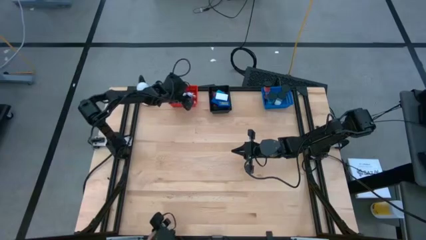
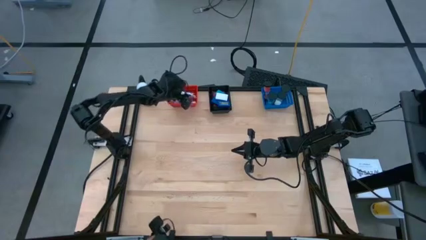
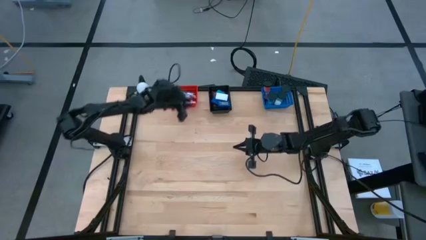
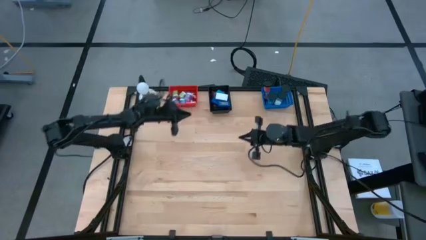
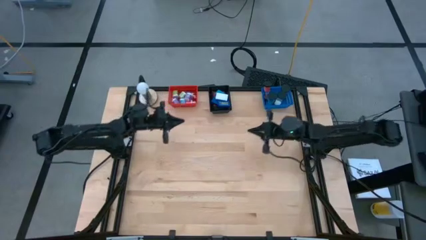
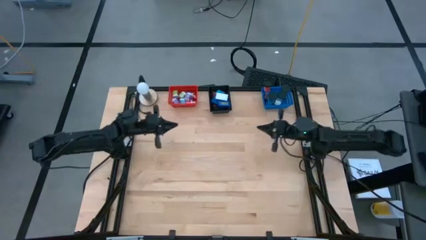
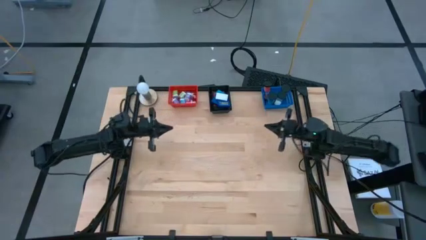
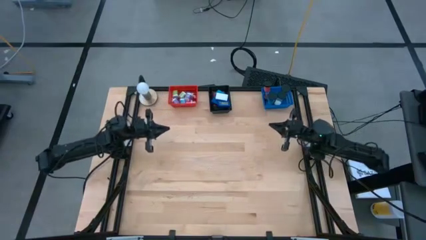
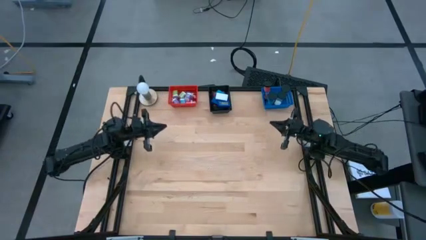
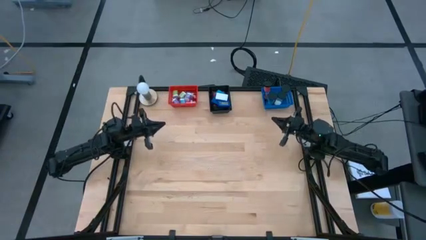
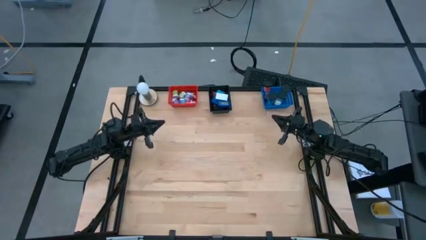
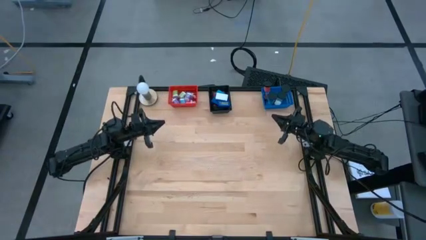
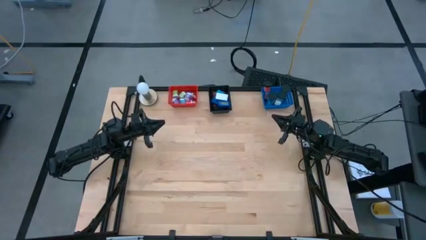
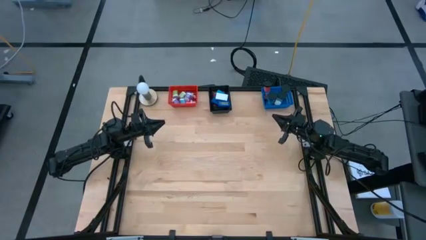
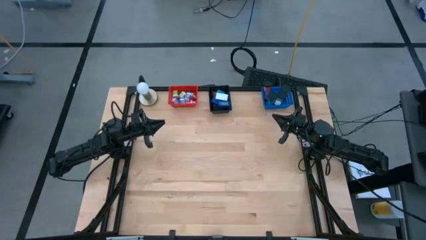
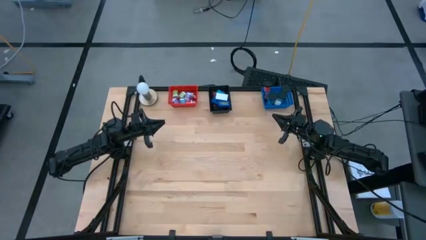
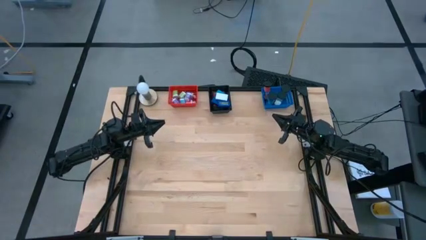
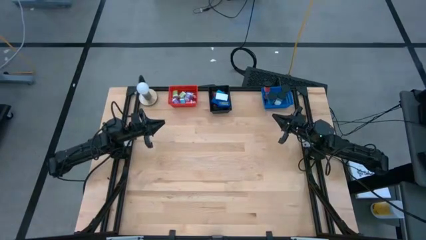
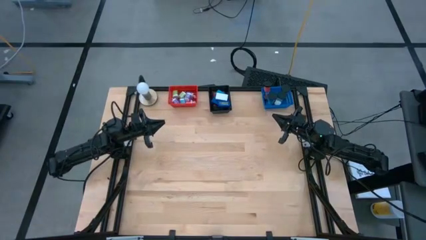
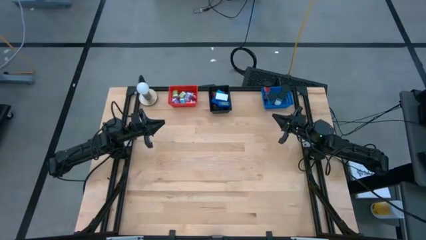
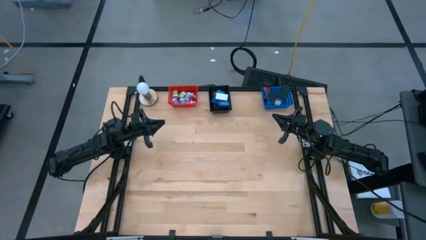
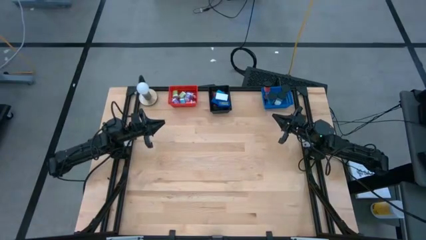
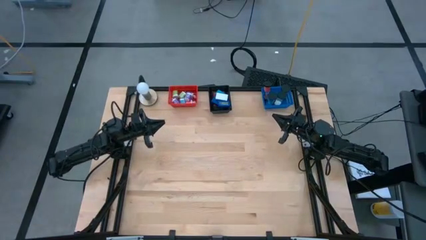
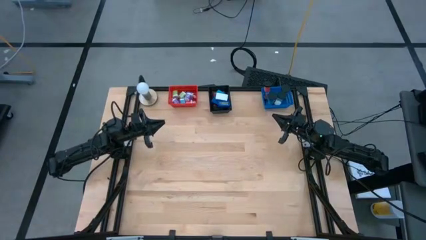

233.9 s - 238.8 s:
Task: Pick & Place Office items
Return to Home Position

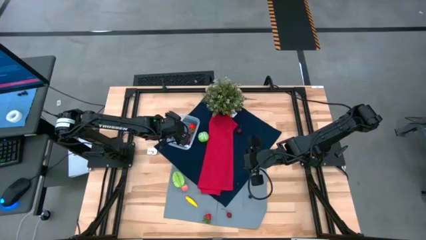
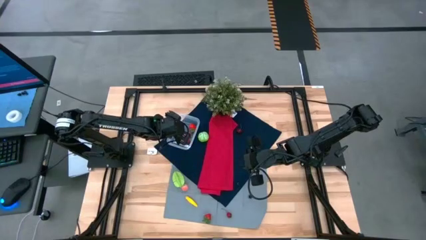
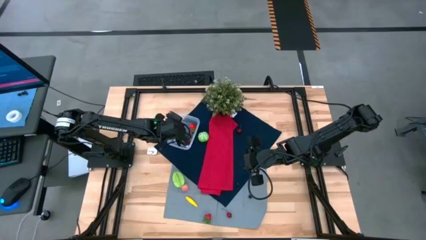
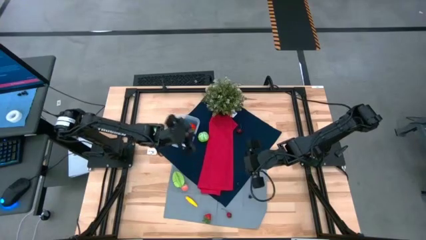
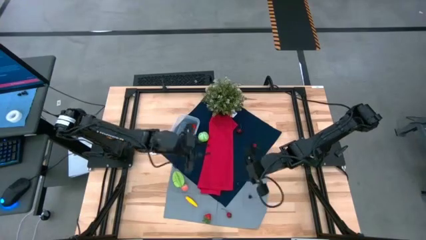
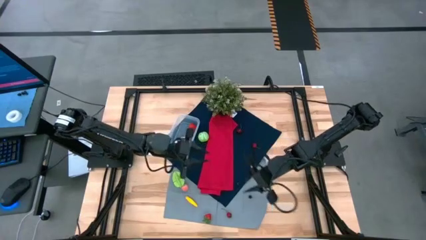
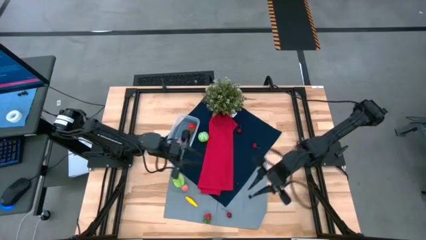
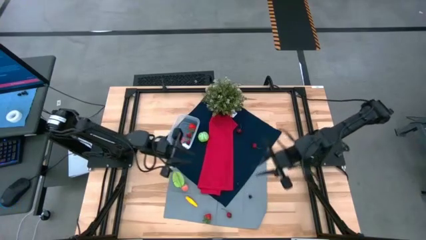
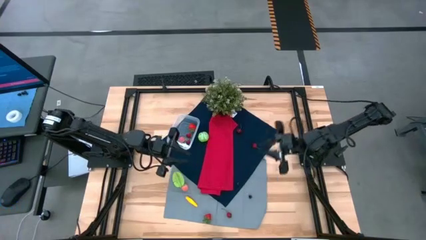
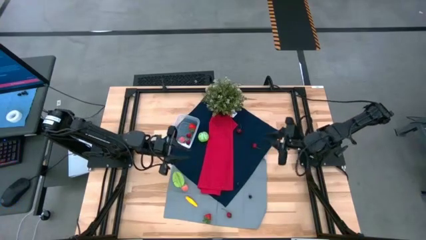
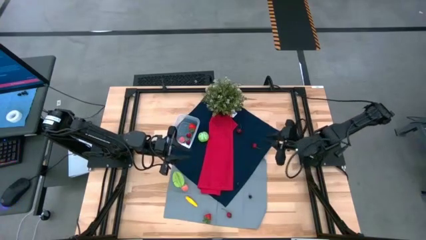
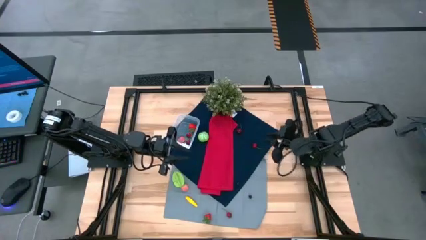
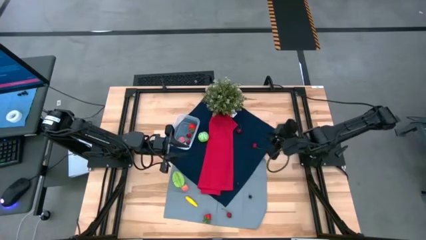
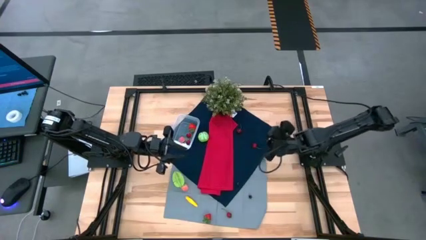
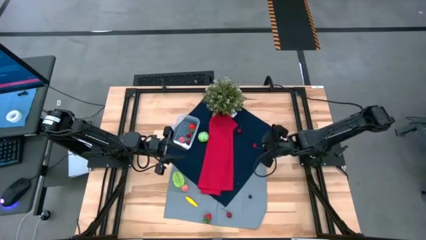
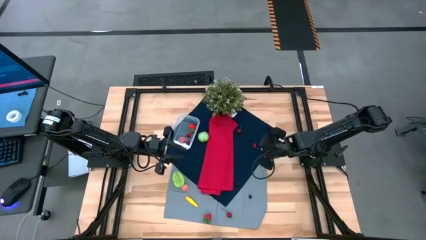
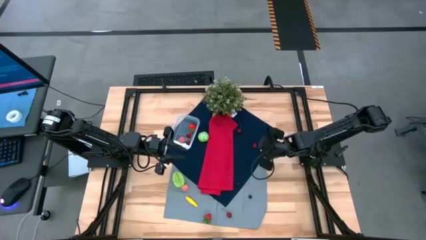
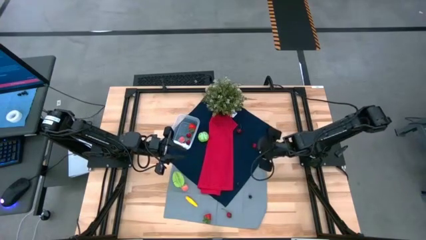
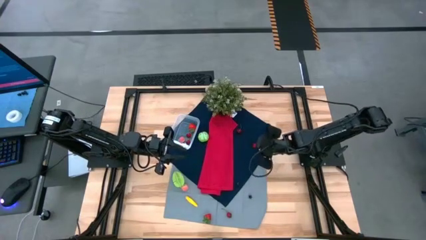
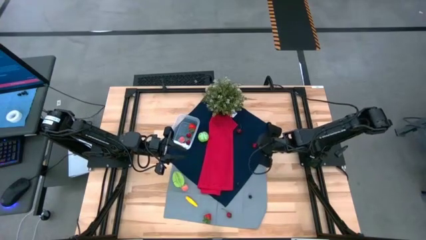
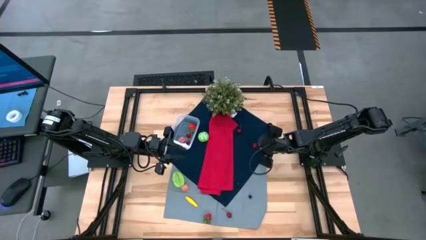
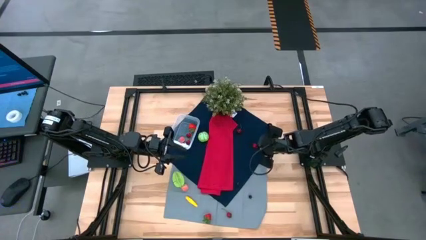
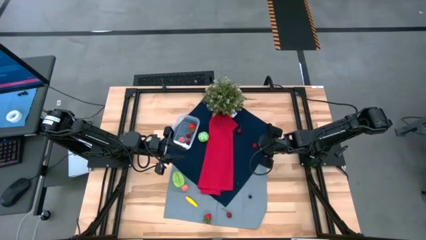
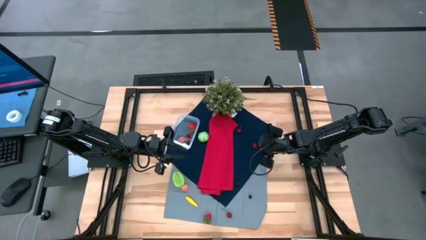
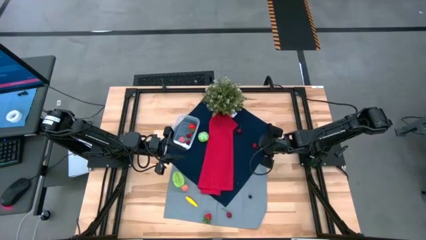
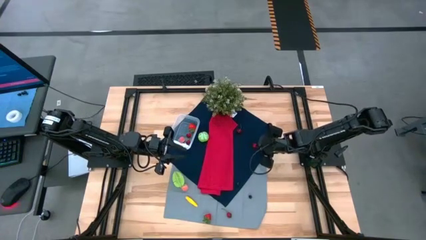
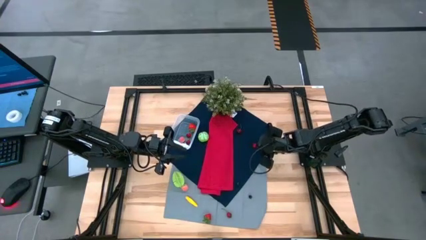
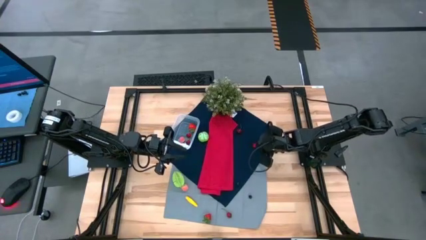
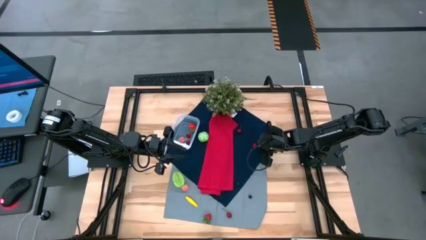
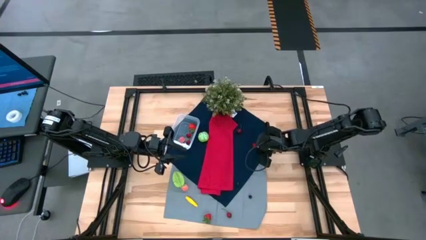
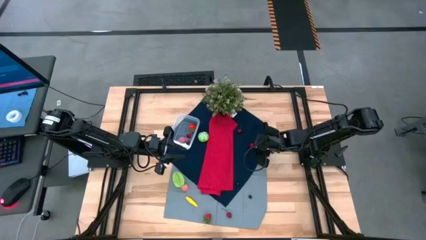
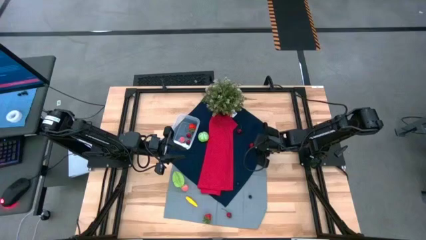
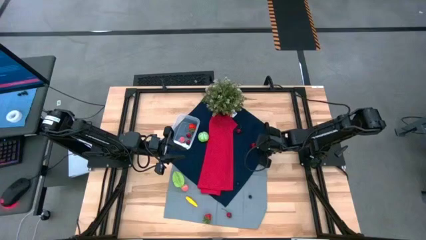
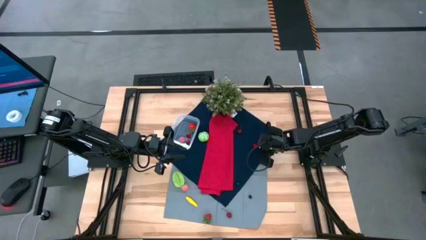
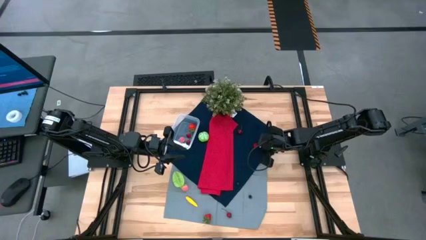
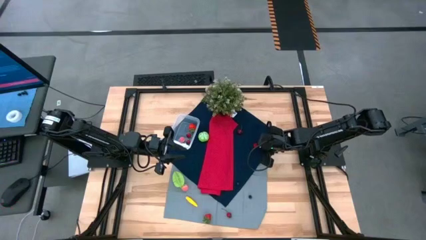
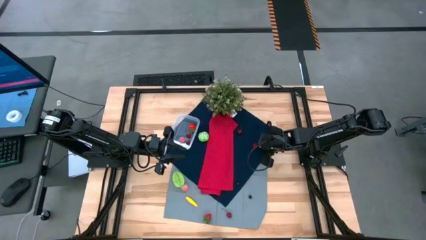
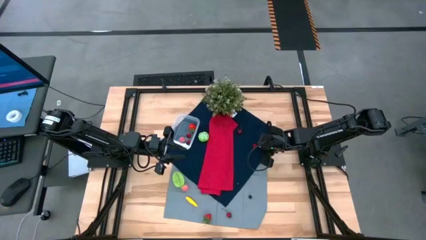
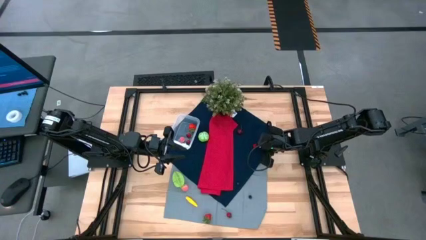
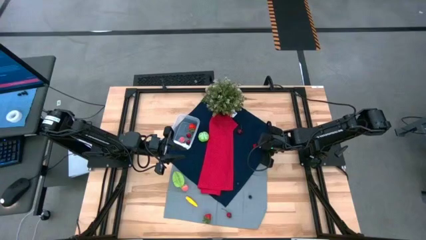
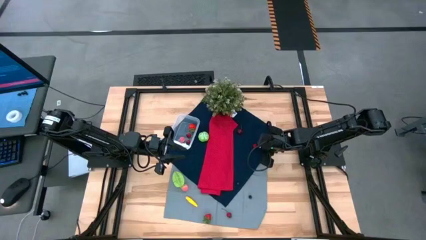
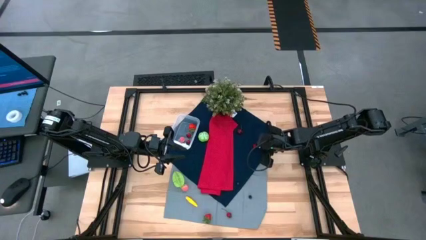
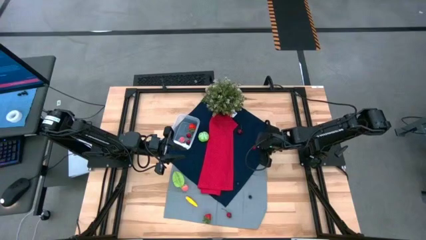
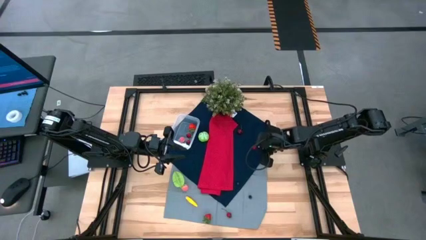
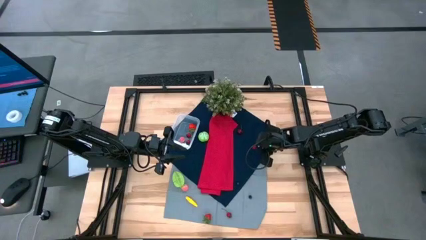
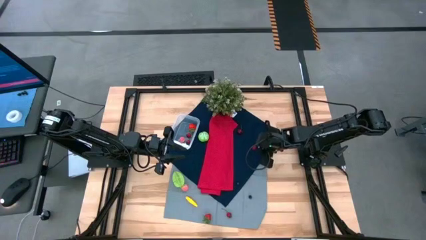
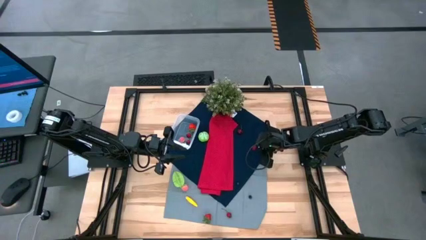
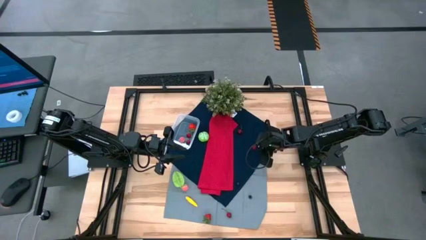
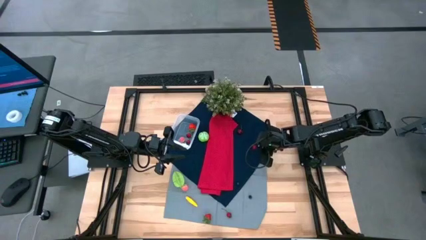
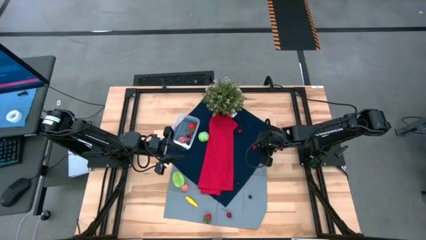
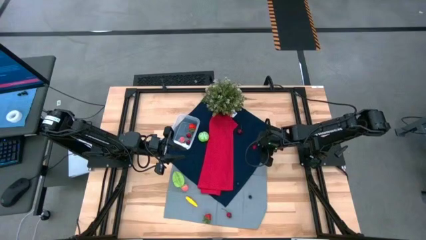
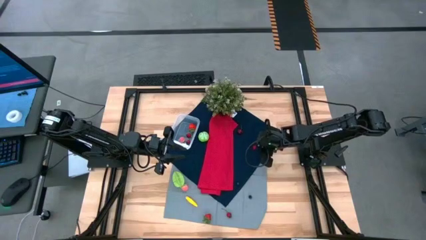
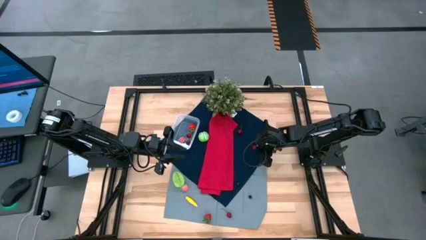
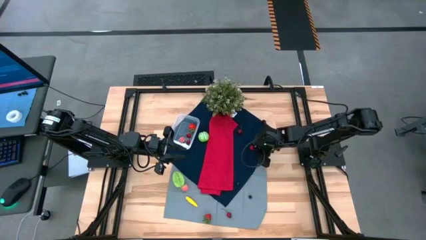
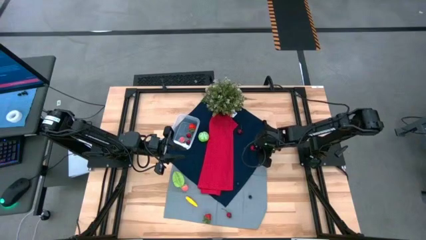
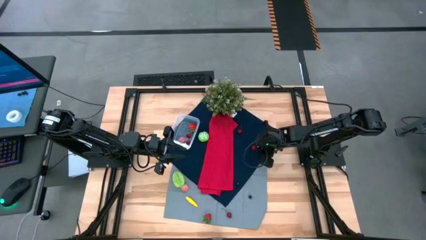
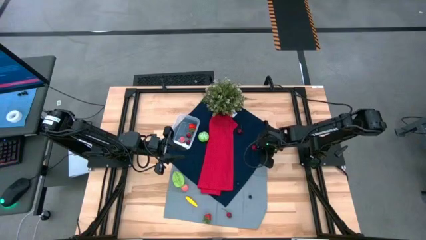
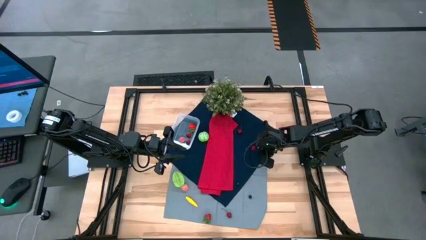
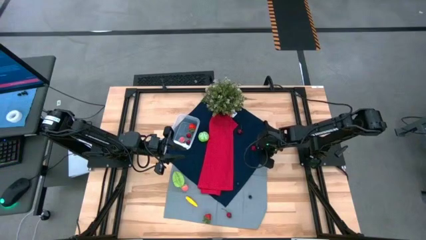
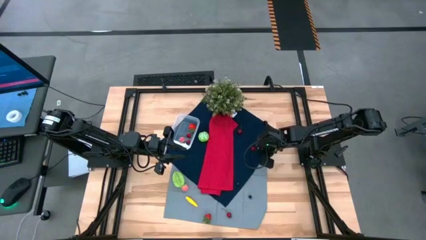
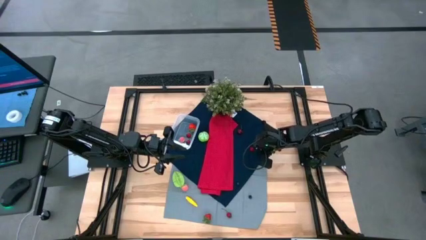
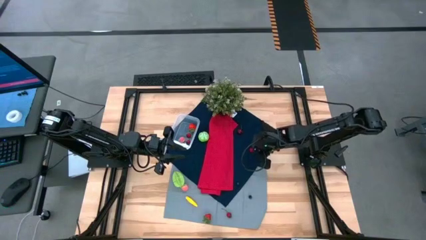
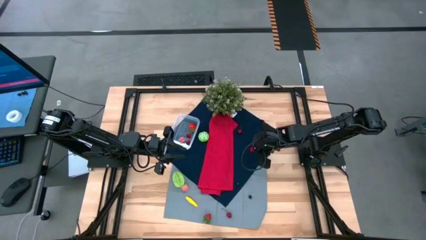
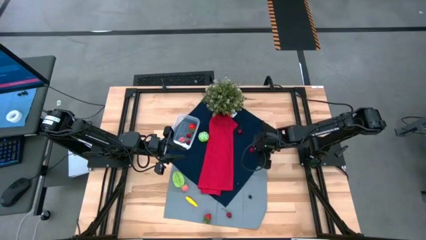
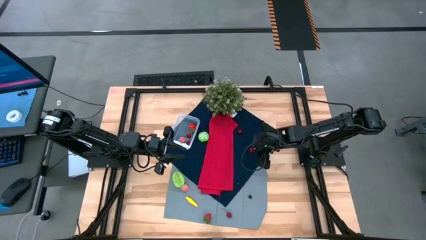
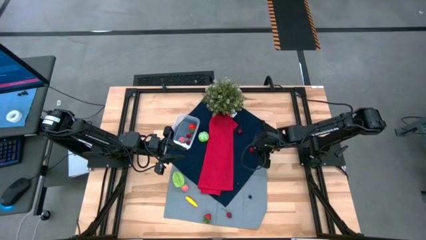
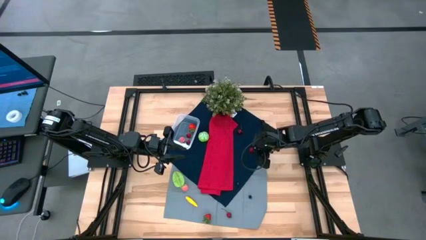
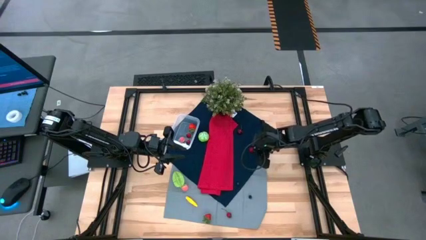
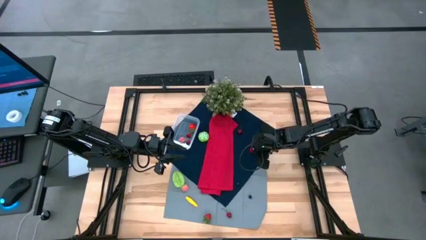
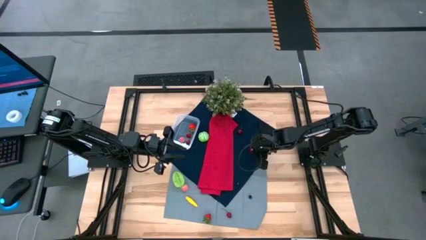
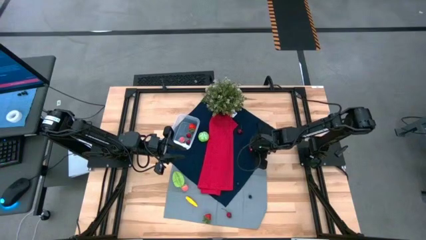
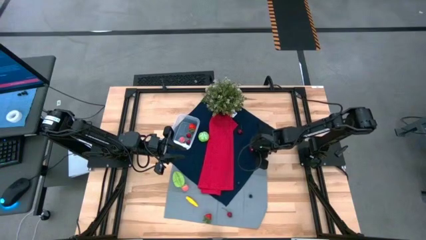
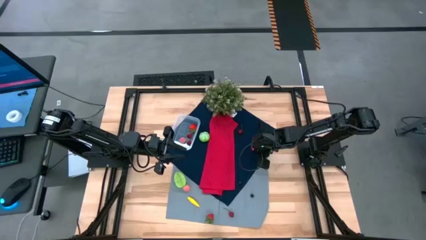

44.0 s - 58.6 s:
Task: Pick and placing Produce into tupperware
Put the top right red cherry into the transparent bin
